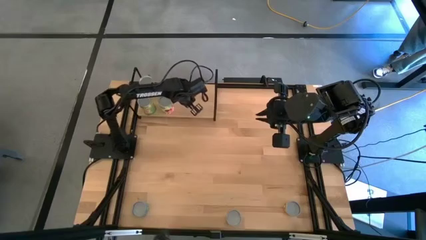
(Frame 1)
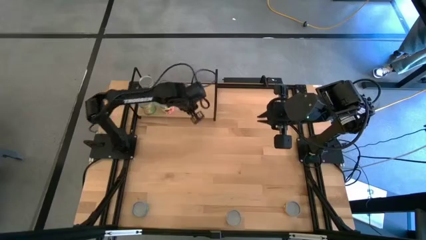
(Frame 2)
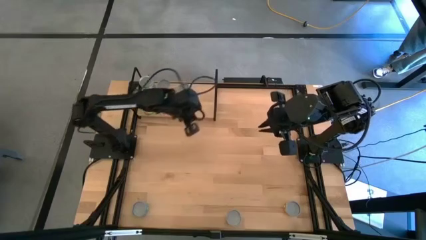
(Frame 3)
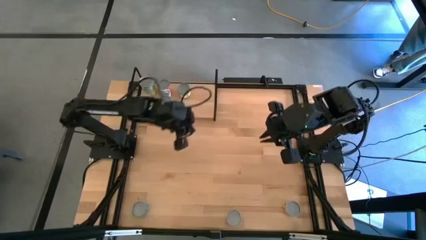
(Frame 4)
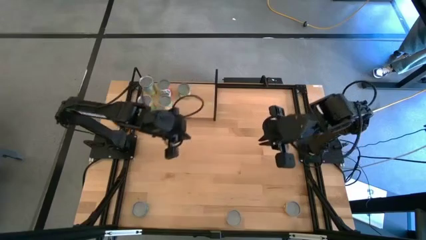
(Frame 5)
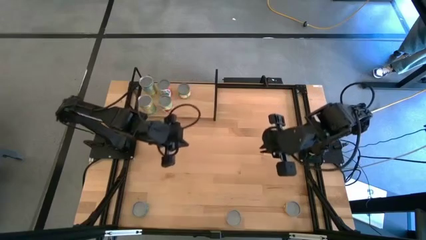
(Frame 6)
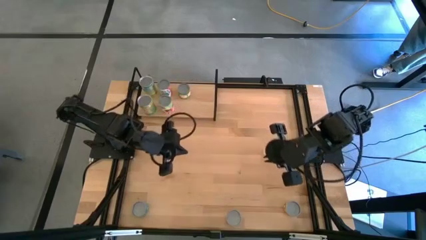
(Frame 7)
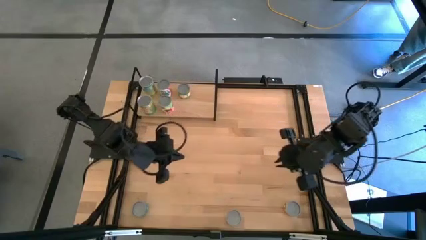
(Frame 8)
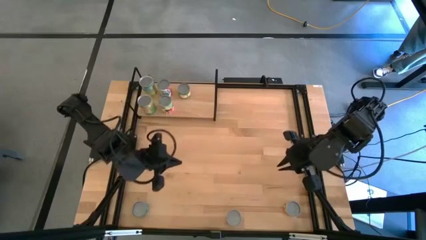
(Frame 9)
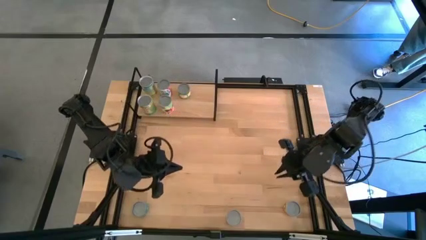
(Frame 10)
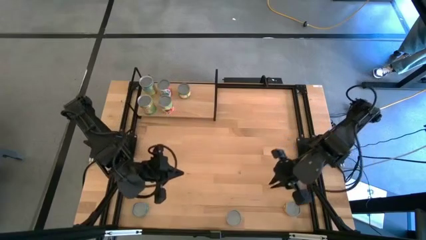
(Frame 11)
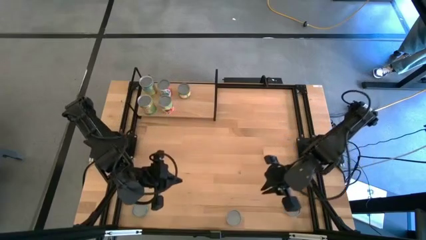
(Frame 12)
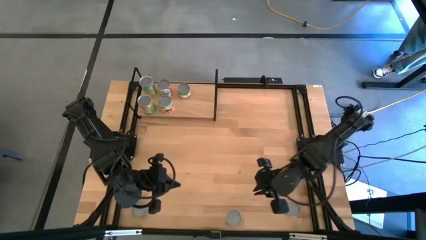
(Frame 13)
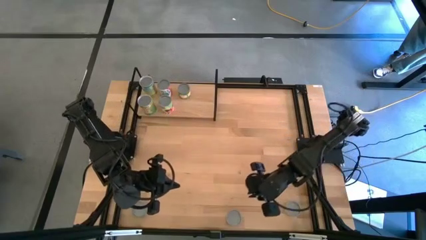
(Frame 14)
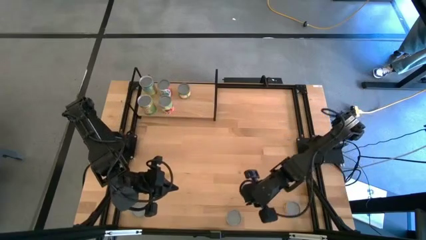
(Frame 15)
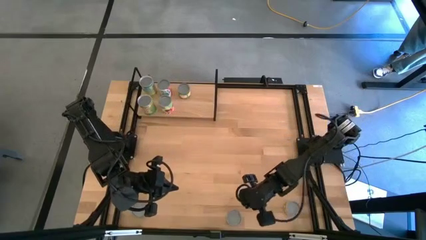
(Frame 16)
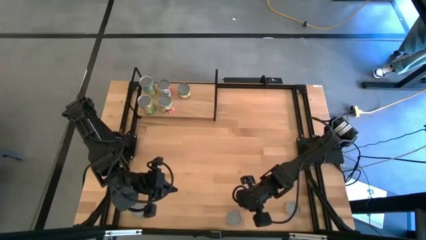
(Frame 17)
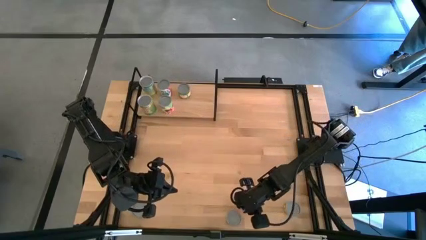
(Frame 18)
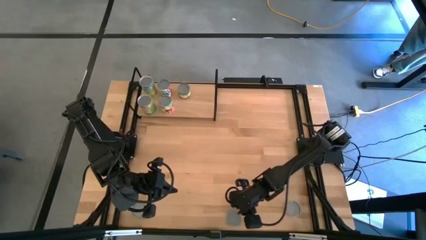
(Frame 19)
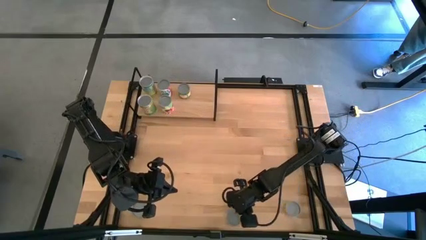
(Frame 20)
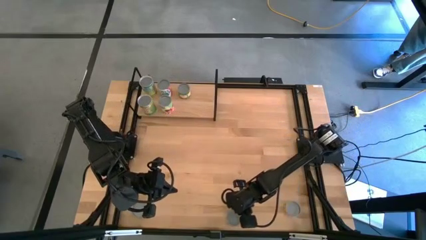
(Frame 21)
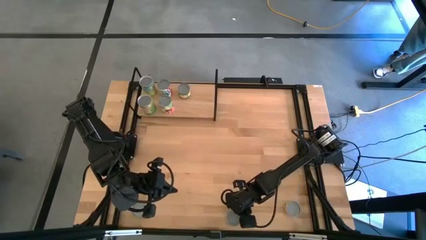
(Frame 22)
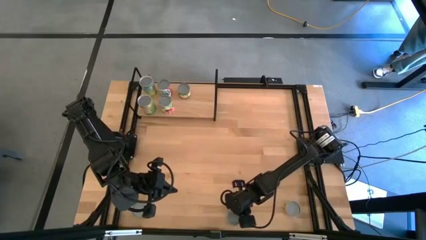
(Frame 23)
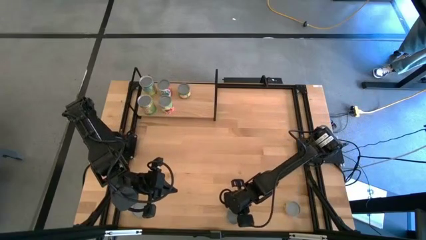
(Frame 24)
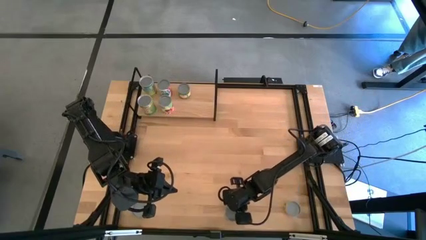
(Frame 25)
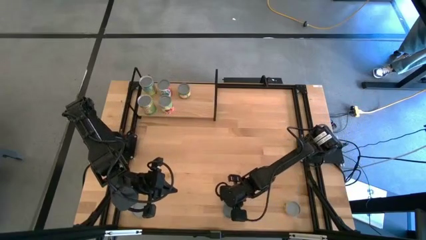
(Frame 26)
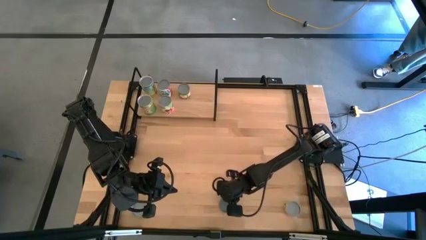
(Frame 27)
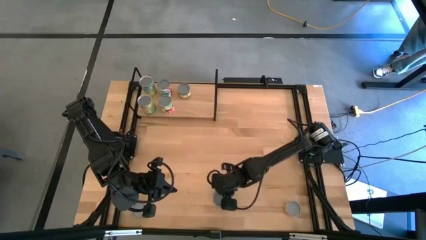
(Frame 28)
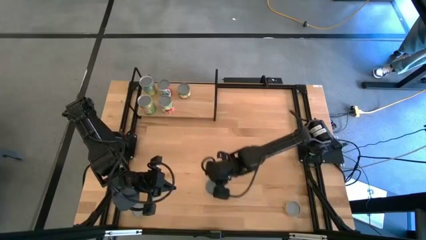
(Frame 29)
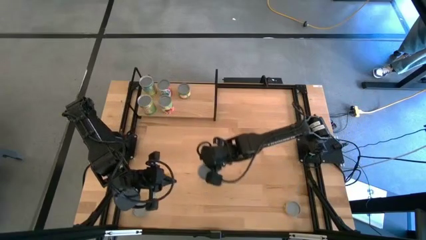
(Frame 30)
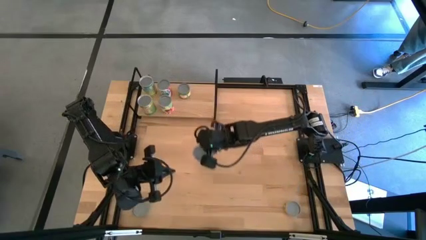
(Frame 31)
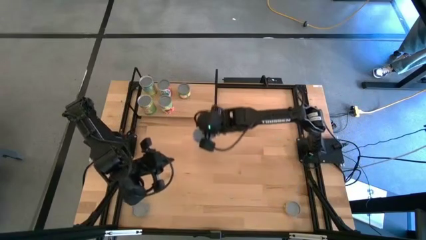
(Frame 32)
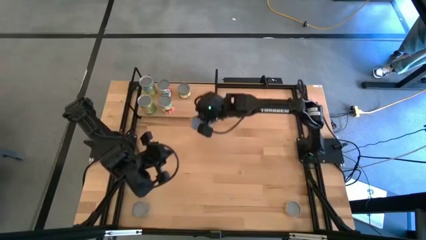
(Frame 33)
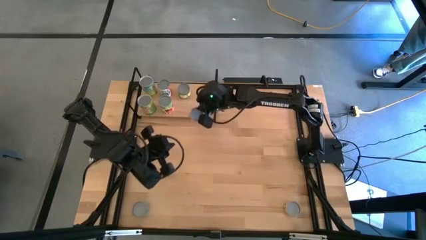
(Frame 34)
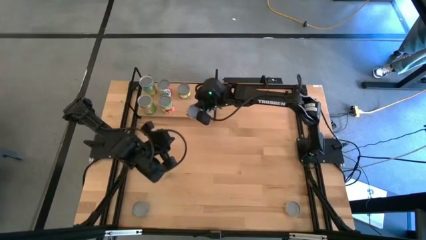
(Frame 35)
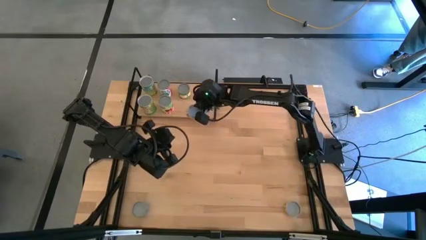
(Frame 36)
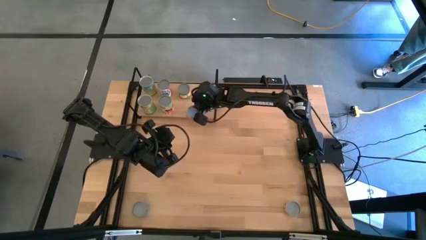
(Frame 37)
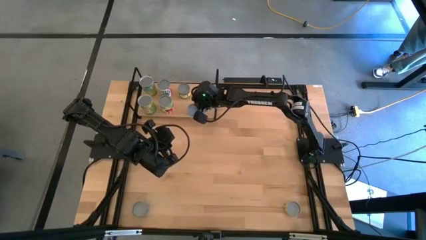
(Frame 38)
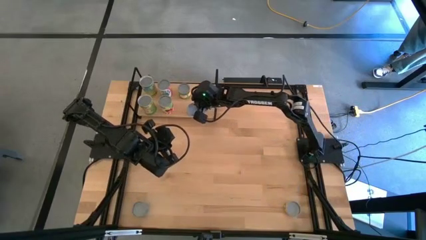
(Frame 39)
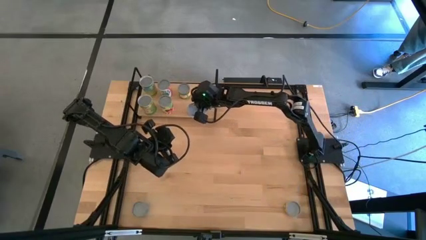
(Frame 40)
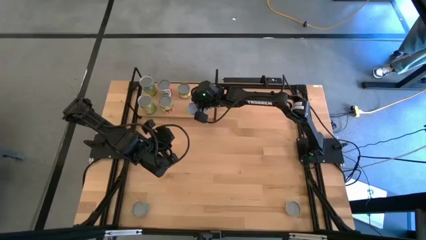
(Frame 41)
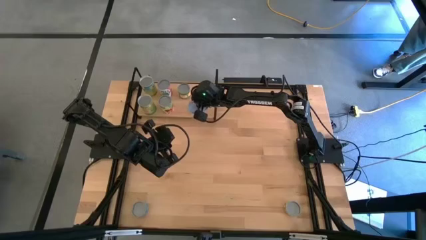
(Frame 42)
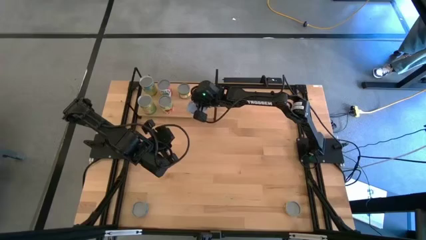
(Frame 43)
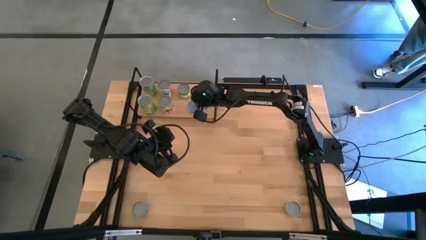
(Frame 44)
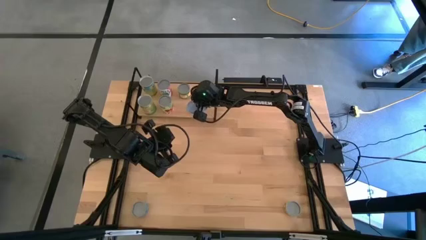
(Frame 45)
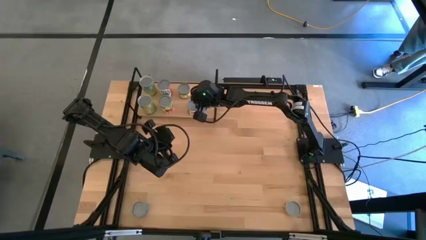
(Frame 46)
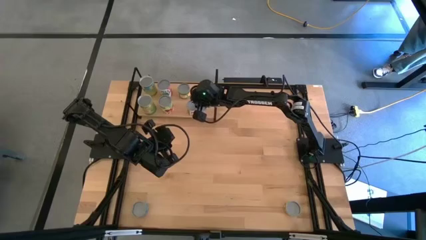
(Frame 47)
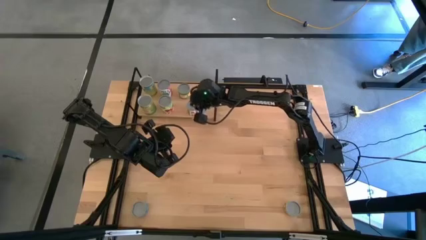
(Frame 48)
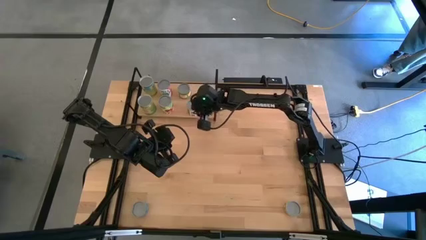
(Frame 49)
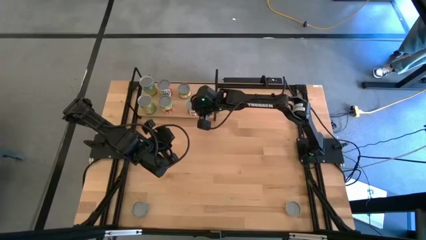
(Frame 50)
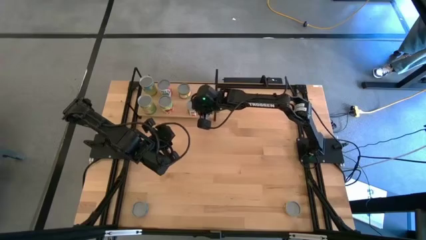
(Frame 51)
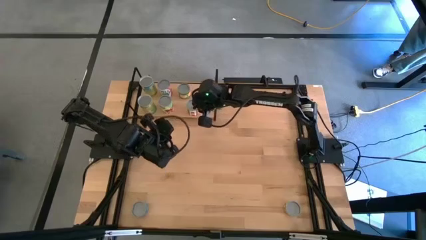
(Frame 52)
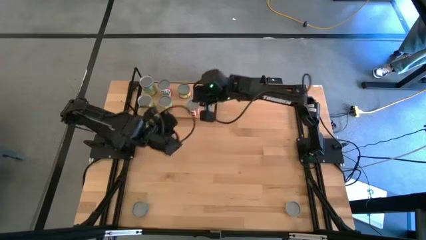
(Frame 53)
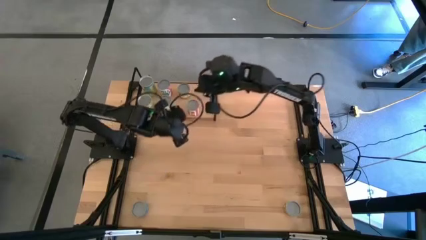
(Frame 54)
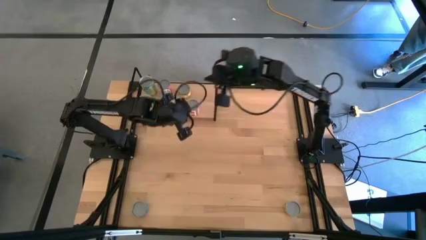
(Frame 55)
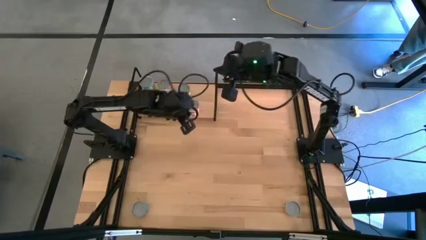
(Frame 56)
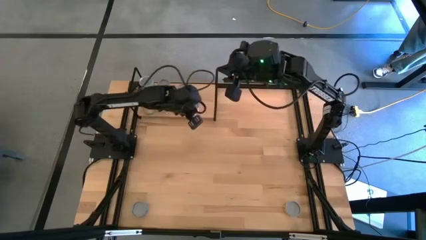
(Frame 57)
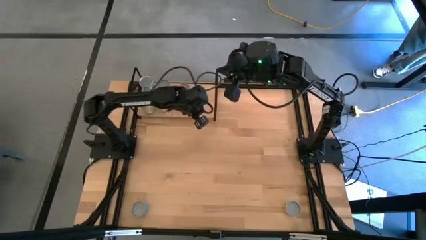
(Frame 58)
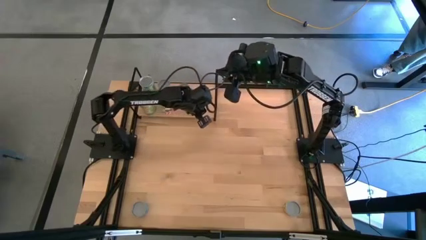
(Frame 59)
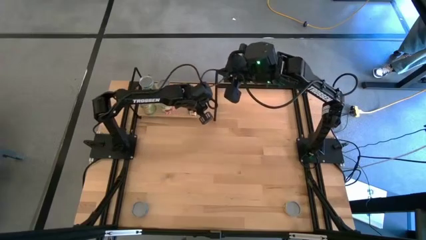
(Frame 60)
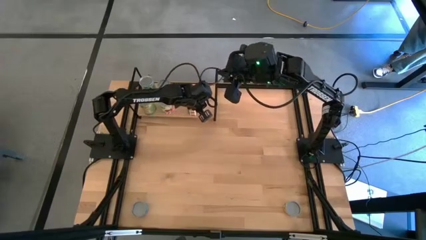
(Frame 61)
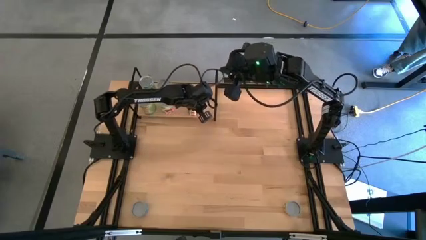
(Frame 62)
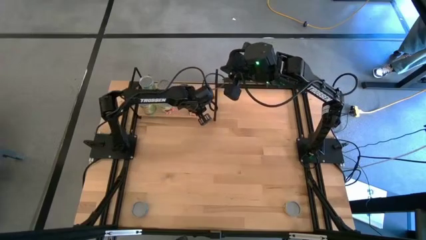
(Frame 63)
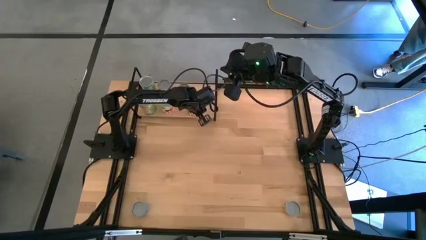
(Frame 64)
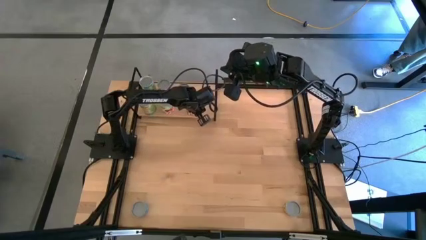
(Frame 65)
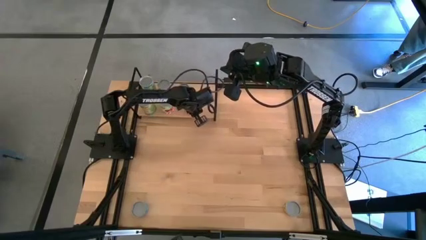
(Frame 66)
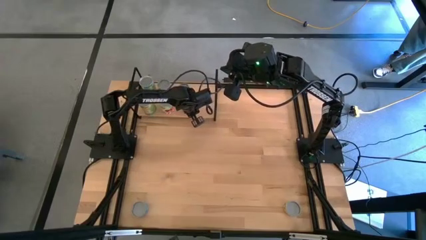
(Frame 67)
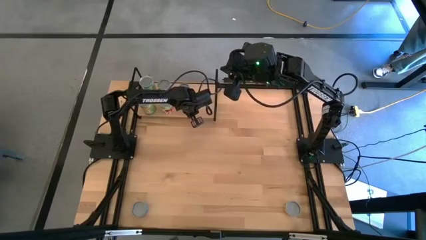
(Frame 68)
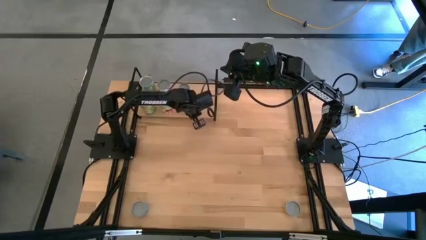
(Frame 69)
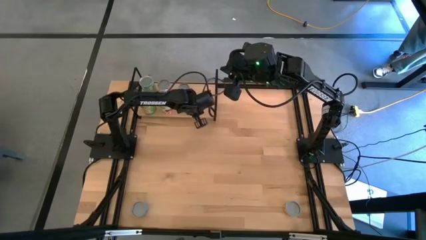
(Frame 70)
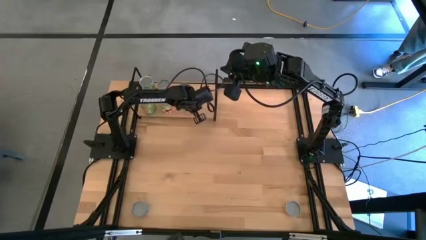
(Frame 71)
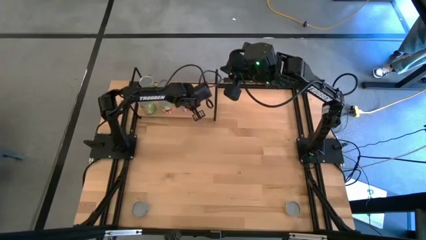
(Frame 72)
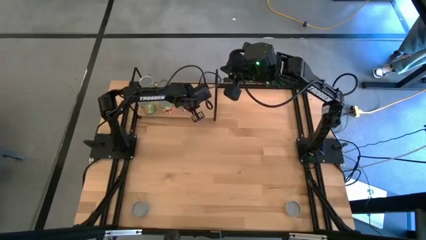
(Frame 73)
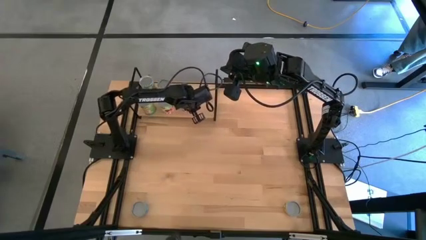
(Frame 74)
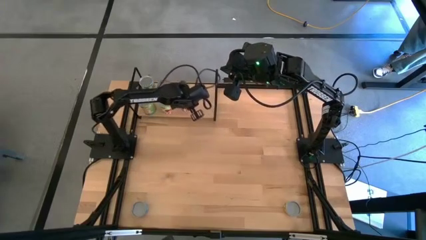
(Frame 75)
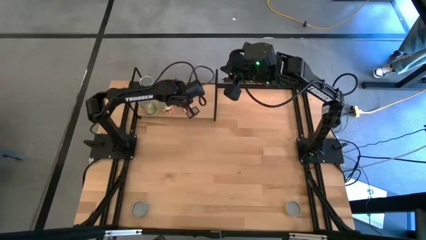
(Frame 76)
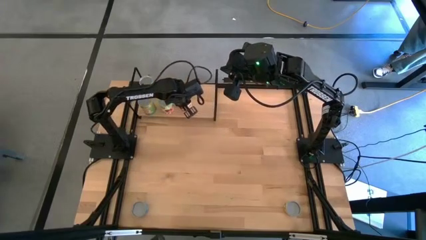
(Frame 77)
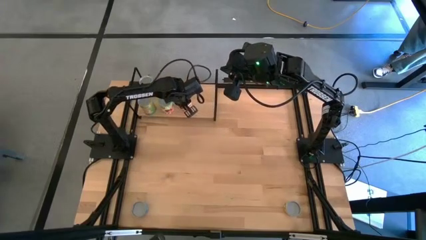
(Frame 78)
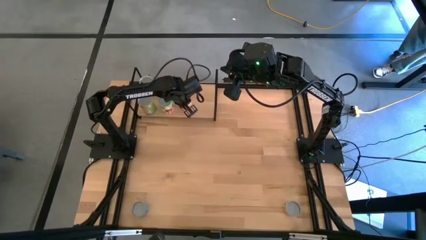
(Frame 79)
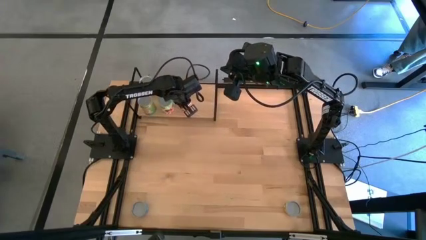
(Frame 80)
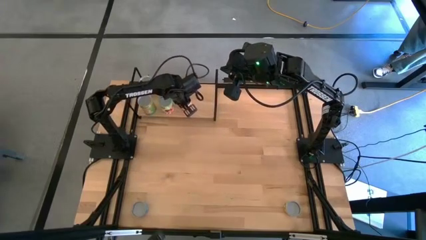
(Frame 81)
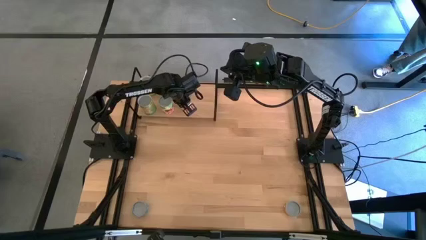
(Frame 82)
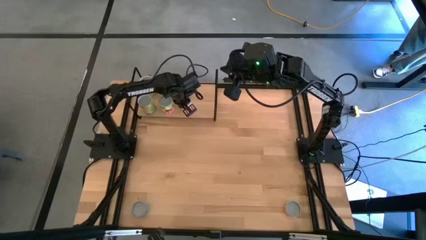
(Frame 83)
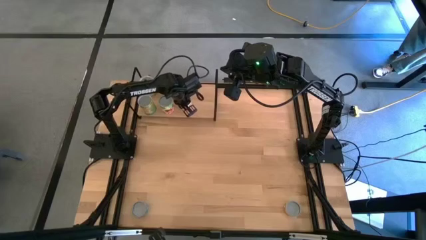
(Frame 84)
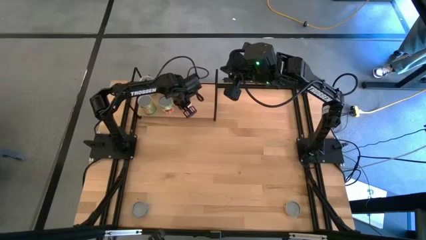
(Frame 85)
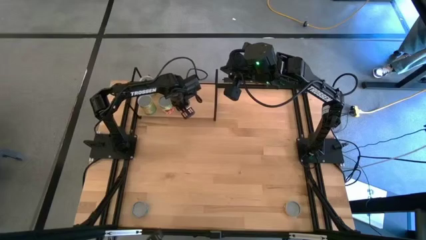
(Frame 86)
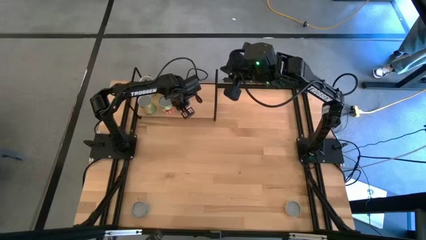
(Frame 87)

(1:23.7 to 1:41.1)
Task: Pick and place cans onto a shelf
Put the canned diced tomatoes on the shelf
